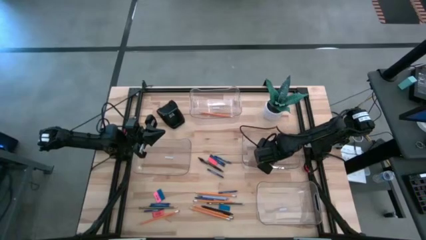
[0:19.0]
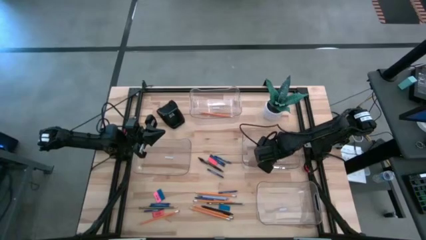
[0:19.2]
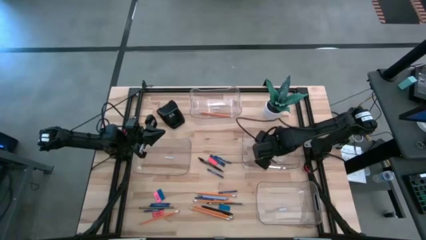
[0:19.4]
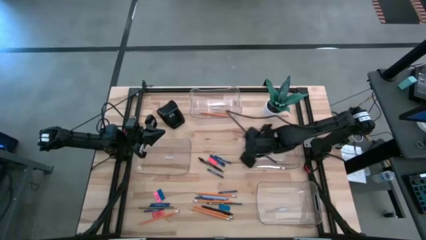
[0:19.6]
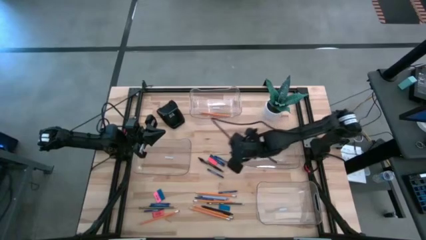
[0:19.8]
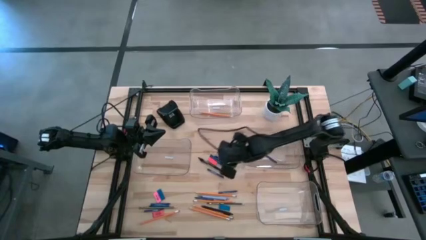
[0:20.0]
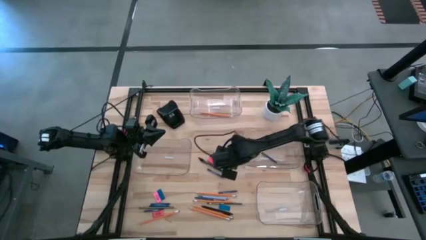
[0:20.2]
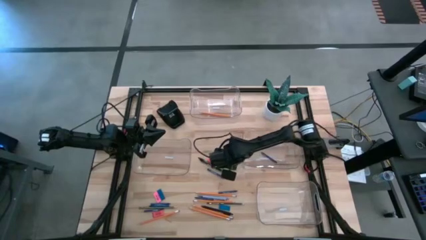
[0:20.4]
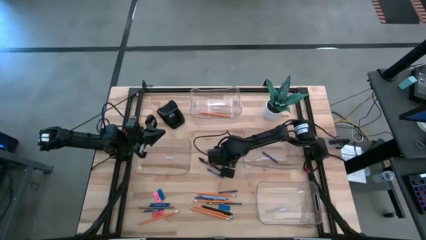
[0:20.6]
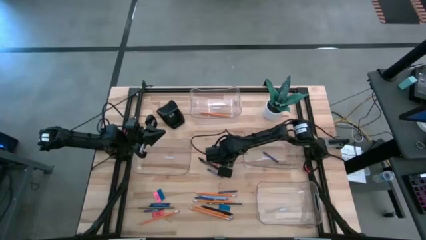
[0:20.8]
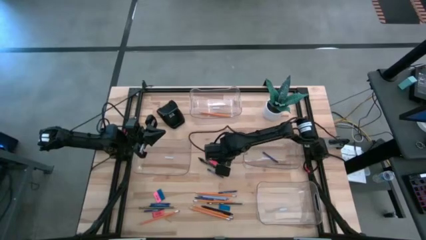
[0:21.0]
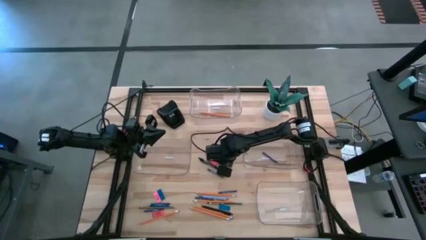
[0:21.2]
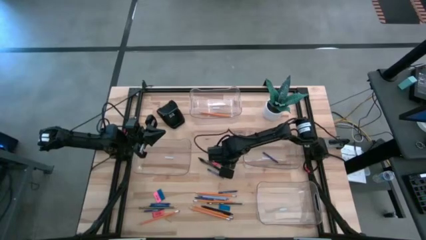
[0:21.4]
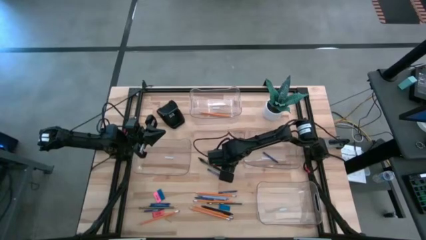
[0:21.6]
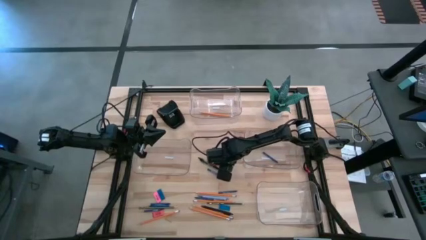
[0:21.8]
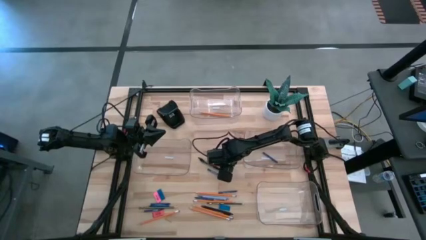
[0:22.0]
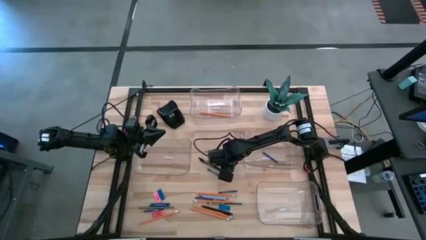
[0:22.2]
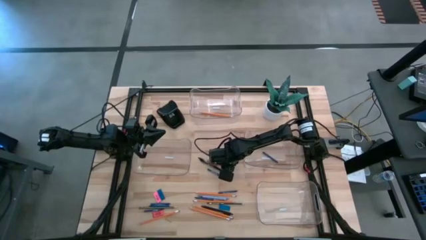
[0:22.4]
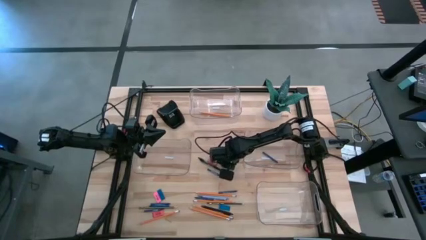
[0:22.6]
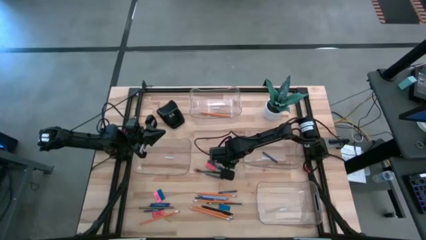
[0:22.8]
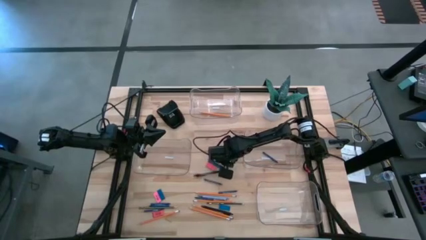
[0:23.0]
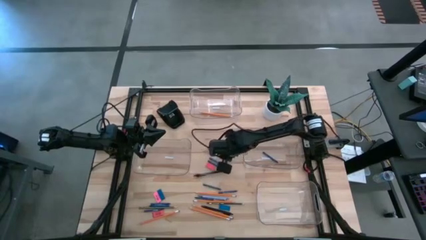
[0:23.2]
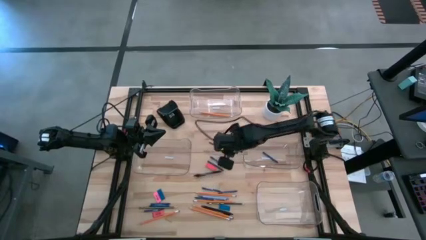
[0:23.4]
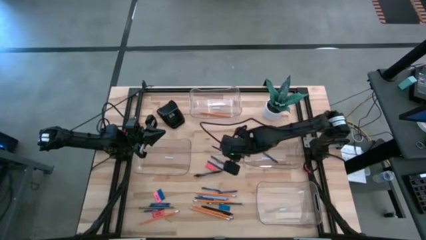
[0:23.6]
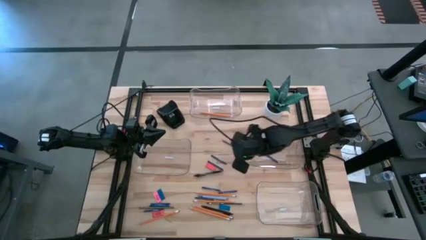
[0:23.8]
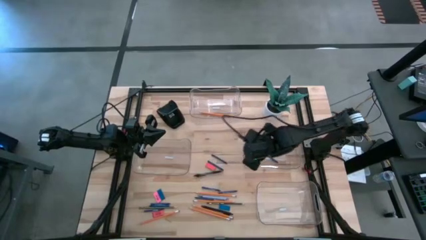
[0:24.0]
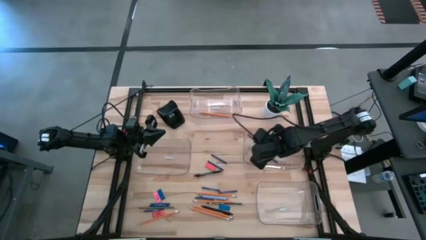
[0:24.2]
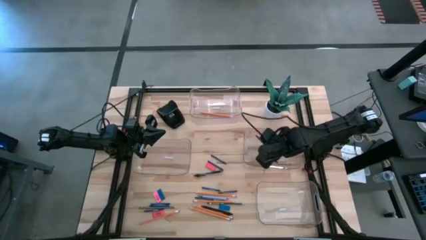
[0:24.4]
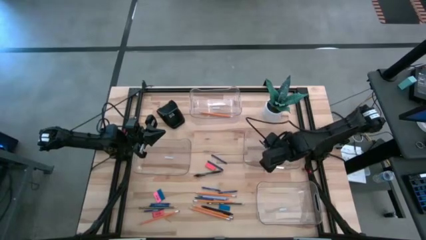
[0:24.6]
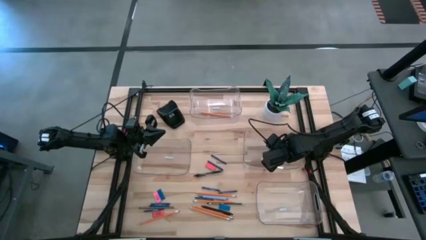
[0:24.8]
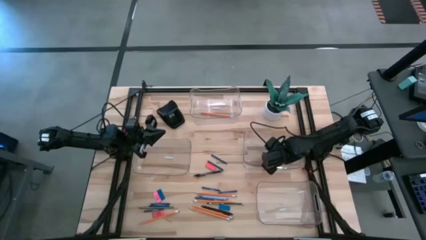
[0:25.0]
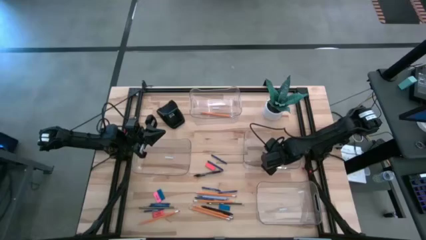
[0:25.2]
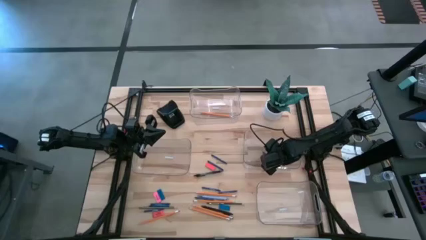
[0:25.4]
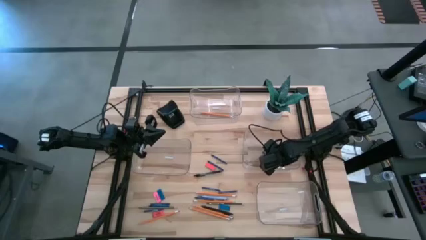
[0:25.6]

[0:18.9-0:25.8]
Task: Sort crayons/erasers/pens/pencils in bins
Put the blue crayon into the middle right transparent bin

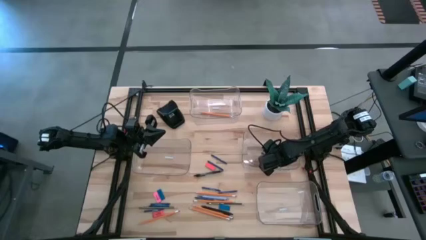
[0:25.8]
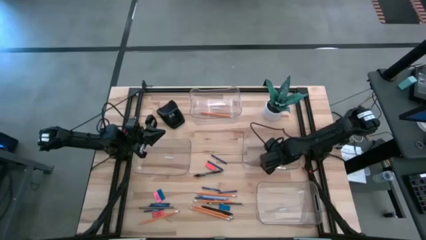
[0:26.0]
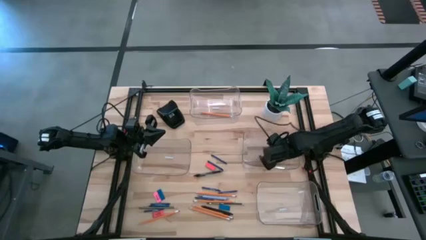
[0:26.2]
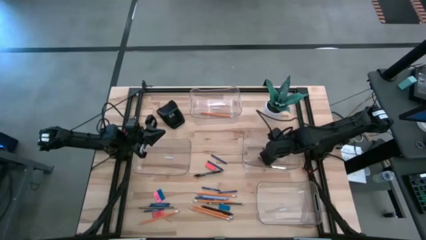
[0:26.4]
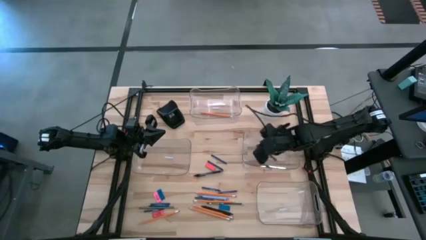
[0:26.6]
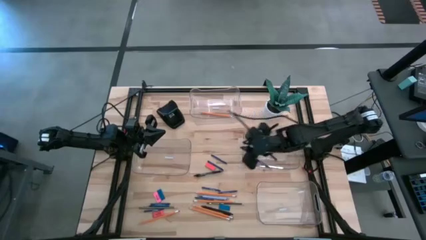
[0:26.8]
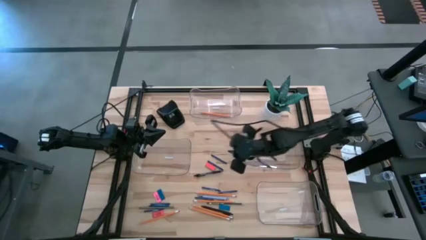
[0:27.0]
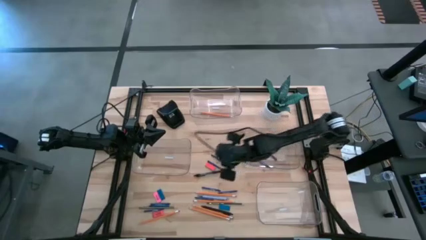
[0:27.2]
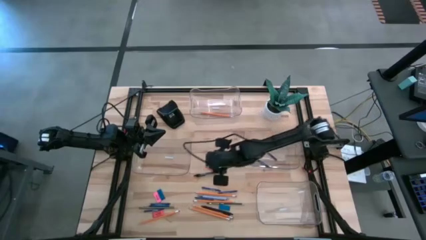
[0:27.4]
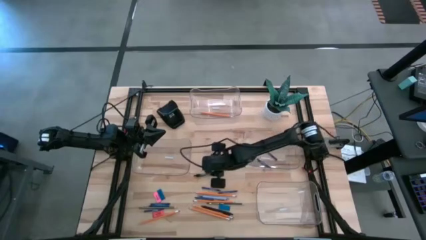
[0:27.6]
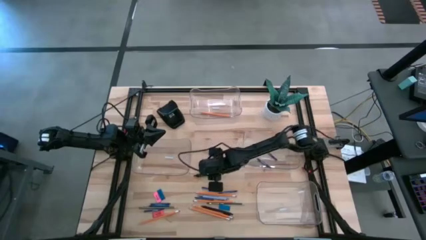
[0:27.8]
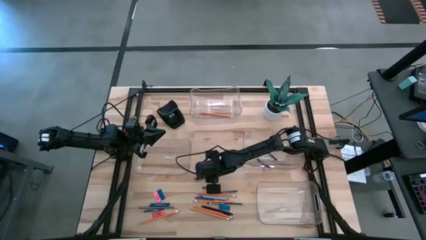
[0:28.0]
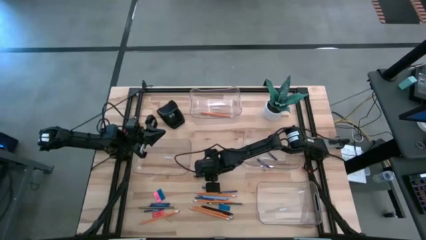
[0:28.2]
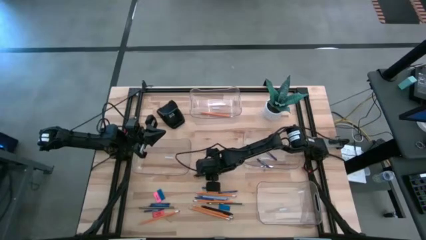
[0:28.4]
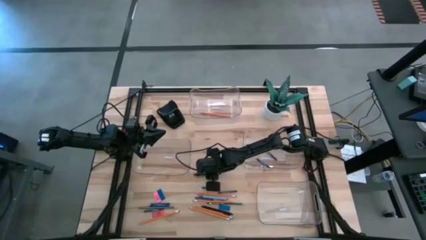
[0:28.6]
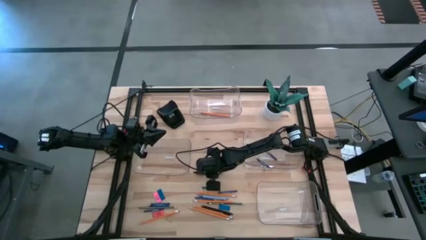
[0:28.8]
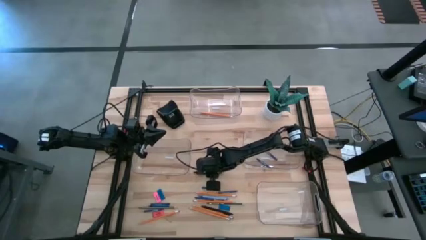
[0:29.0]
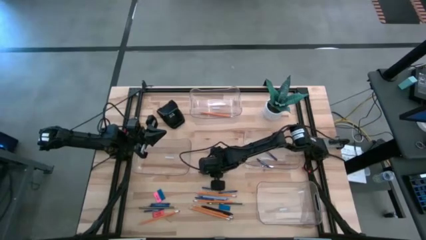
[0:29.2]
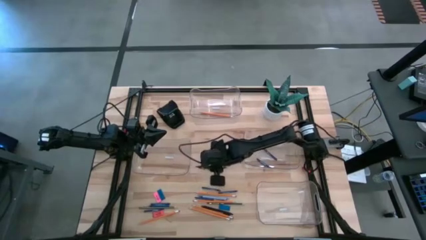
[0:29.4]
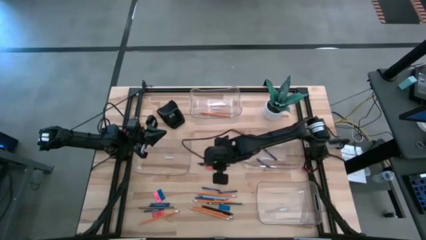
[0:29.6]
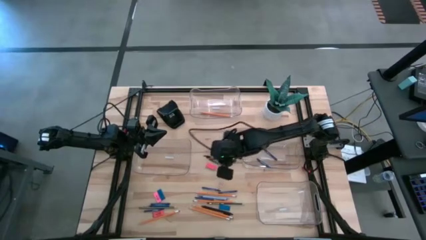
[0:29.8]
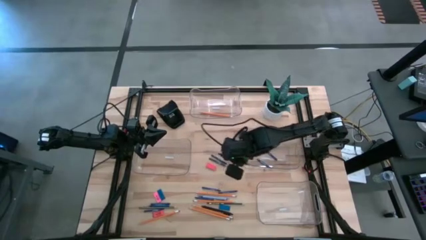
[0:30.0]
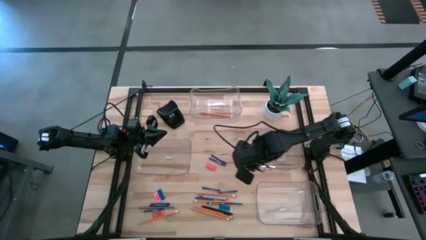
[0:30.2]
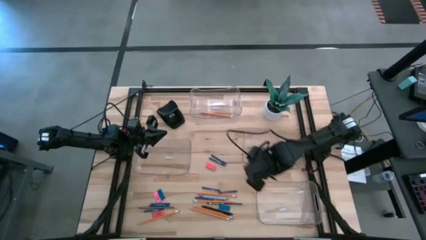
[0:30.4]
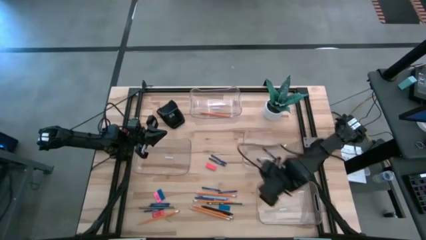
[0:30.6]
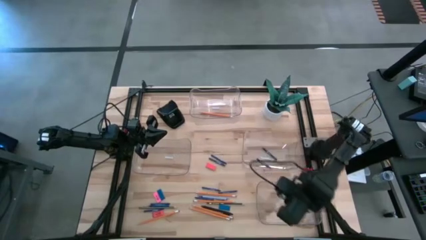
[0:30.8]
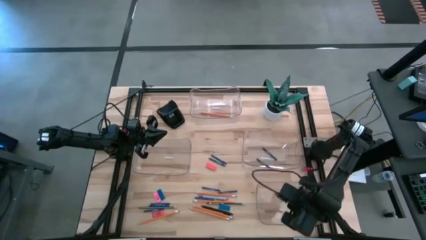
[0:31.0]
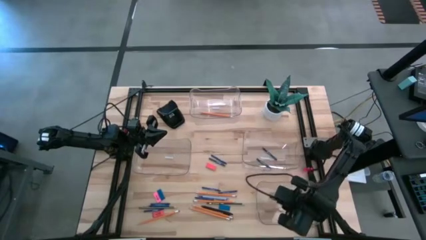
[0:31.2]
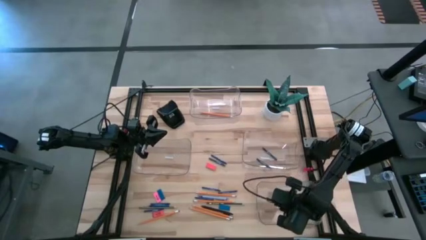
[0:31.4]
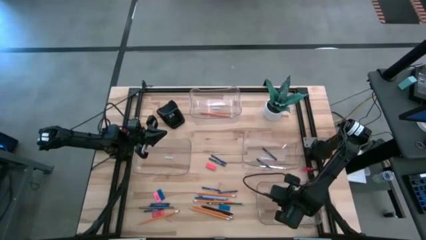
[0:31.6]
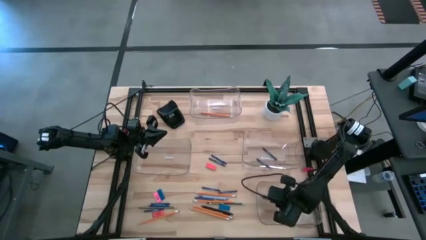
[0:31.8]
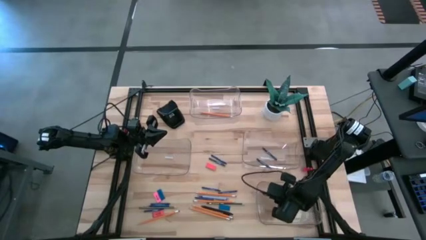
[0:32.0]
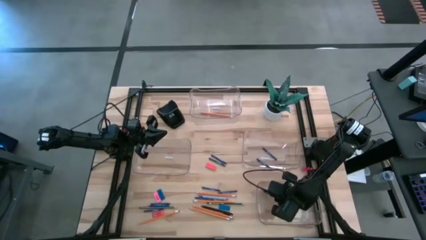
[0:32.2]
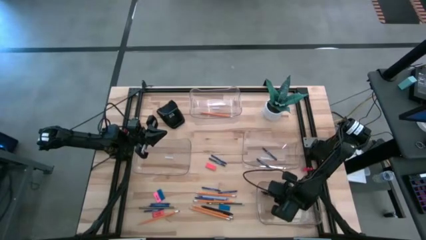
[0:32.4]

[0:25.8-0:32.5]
Put the black pen into the bottom transparent bin

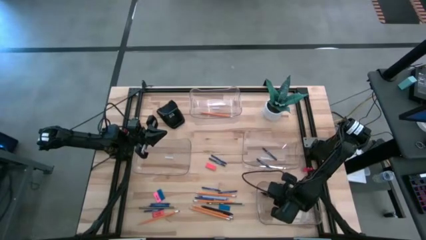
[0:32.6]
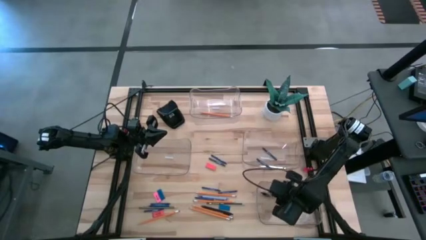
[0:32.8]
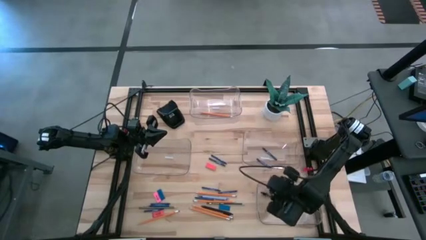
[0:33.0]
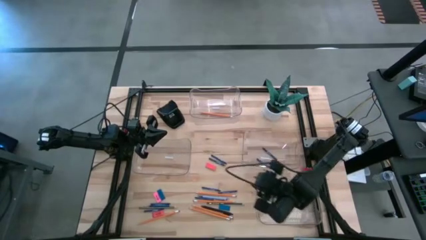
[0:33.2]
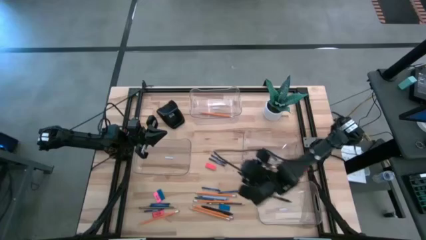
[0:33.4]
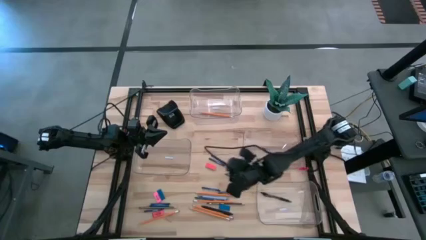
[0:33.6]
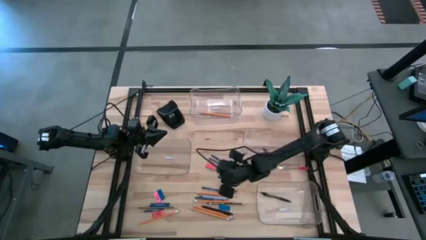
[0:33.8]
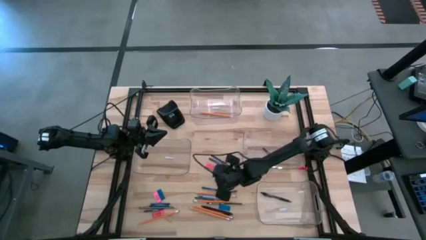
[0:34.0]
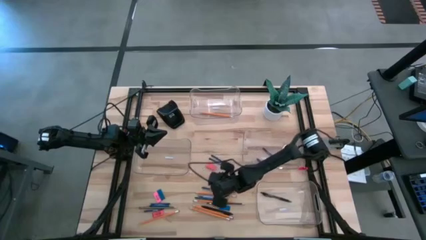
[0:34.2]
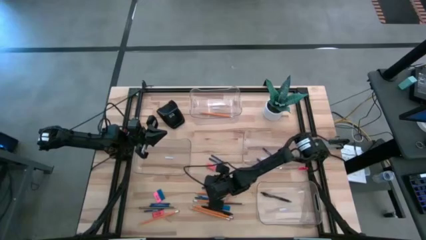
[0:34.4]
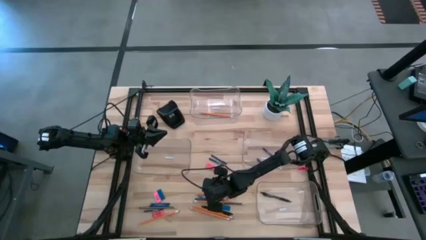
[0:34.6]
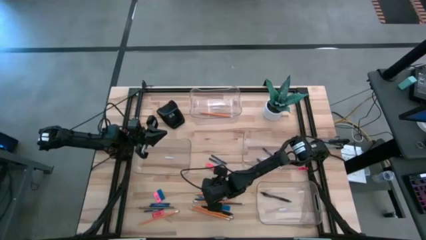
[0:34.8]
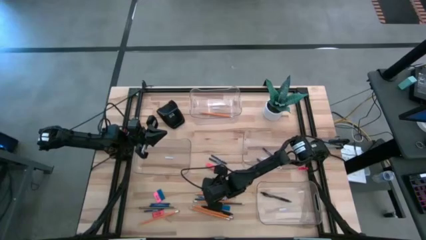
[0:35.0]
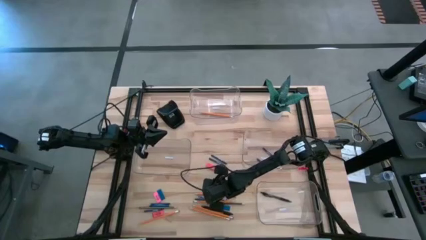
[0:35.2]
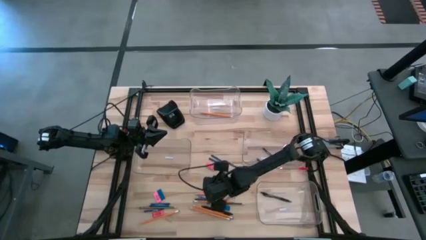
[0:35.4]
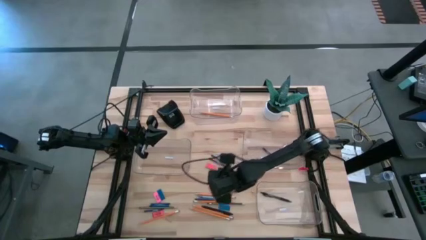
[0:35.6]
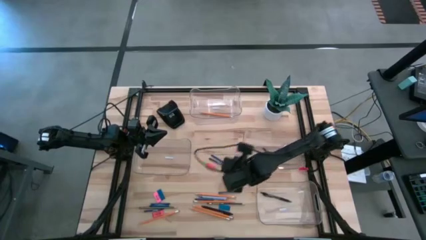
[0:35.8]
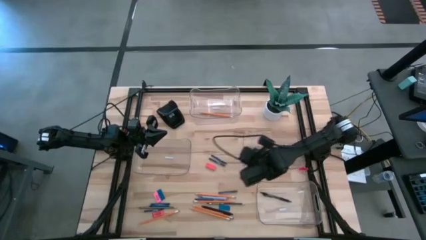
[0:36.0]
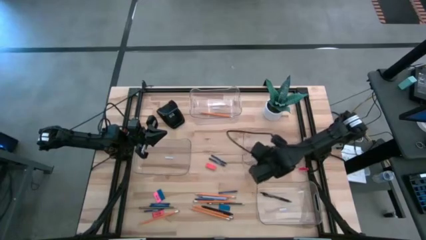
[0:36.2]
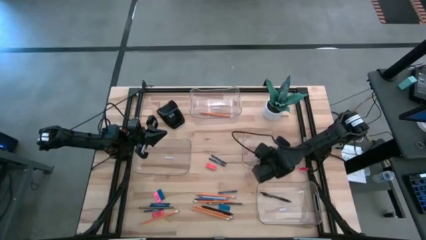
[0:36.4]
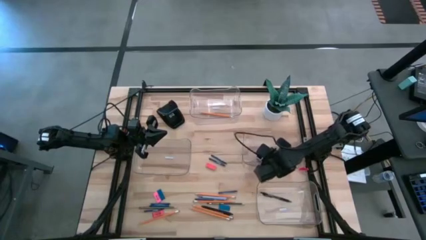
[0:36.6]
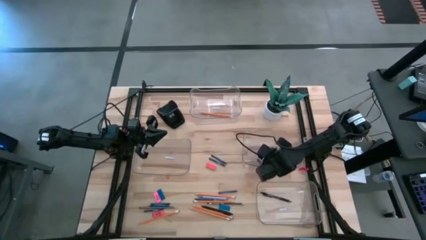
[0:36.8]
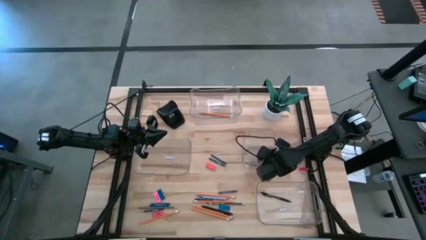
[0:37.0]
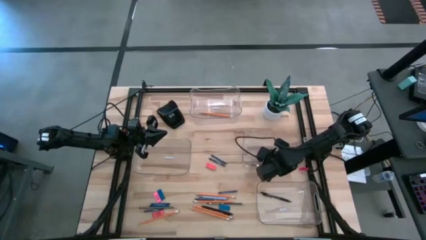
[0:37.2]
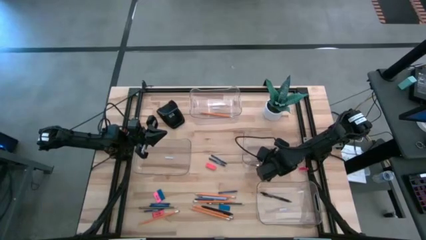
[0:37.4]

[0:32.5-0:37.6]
Put the blue crayon into the middle right transparent bin
